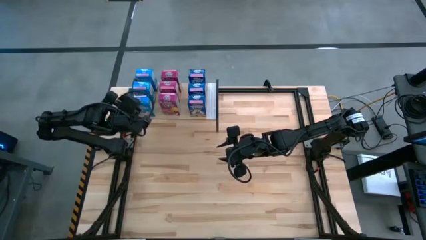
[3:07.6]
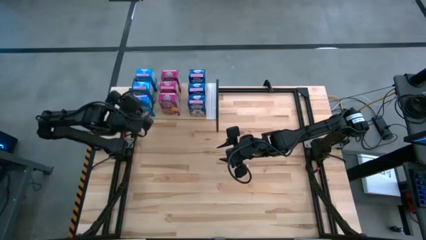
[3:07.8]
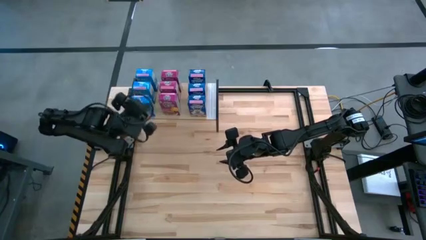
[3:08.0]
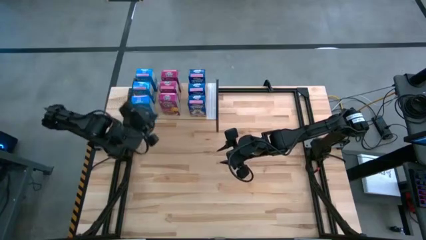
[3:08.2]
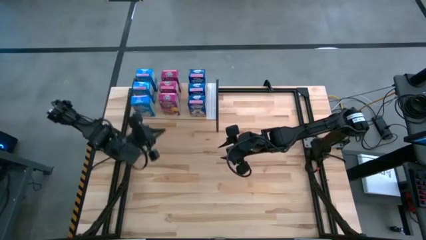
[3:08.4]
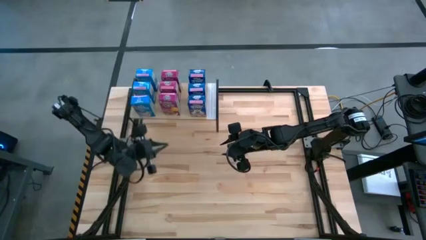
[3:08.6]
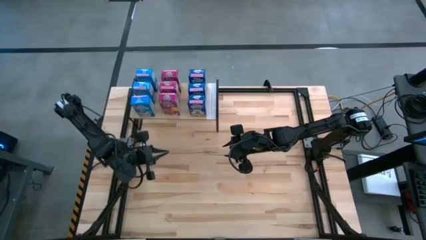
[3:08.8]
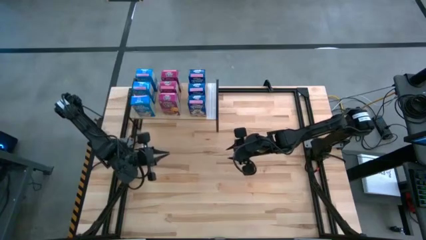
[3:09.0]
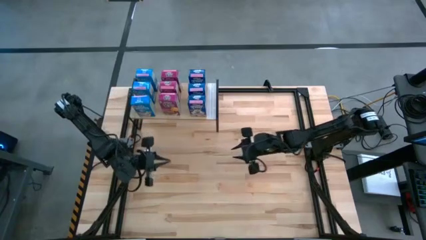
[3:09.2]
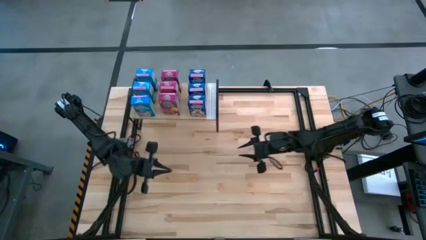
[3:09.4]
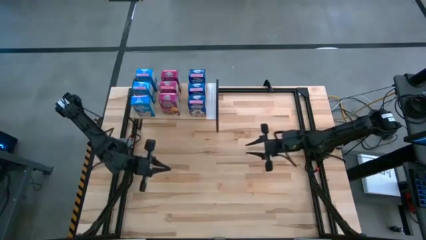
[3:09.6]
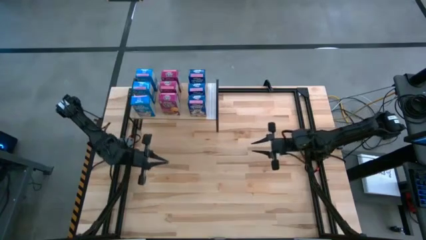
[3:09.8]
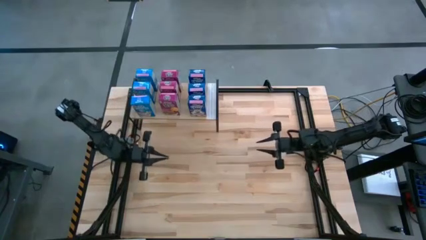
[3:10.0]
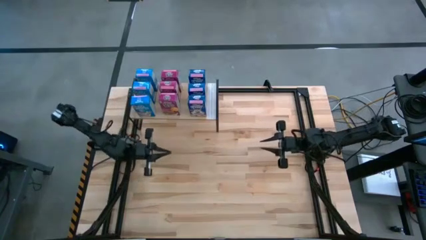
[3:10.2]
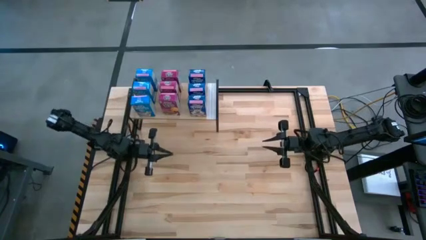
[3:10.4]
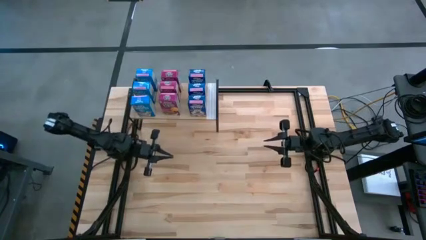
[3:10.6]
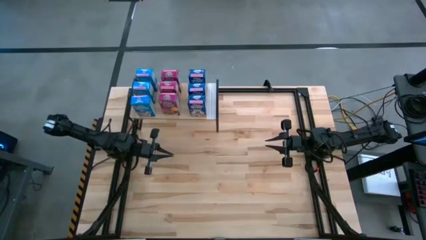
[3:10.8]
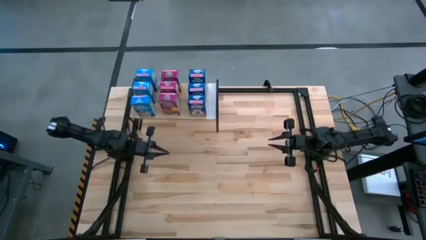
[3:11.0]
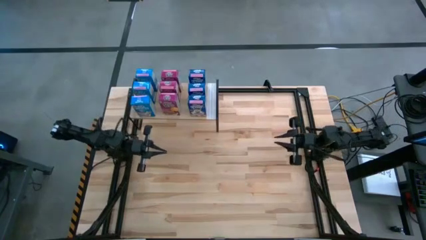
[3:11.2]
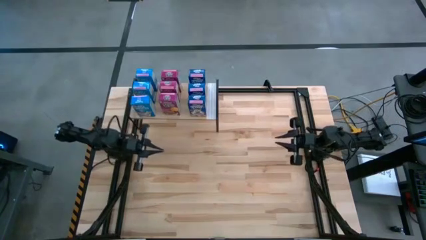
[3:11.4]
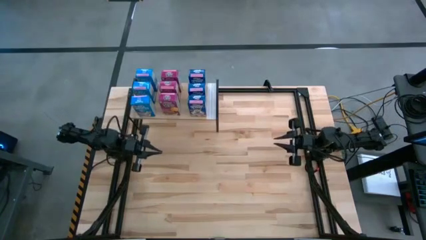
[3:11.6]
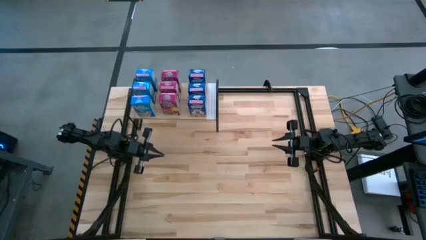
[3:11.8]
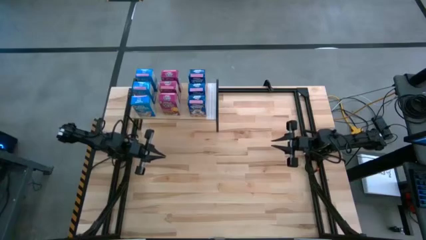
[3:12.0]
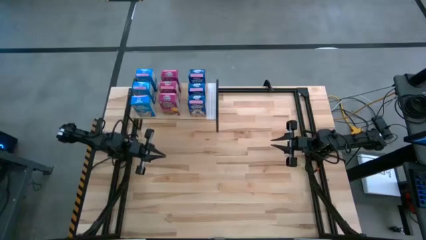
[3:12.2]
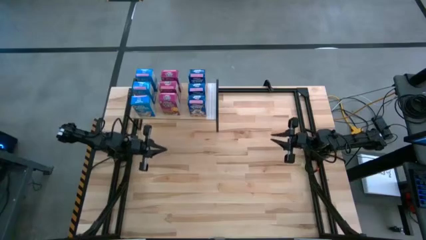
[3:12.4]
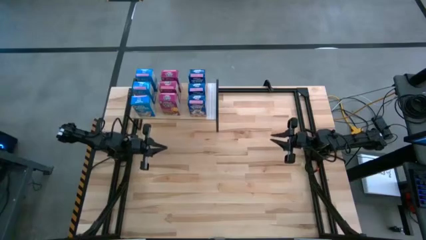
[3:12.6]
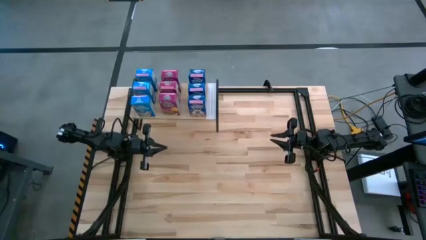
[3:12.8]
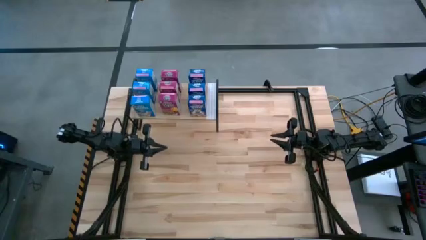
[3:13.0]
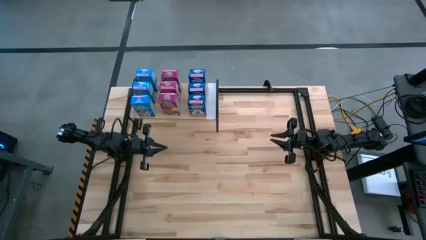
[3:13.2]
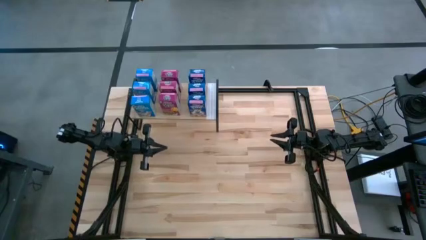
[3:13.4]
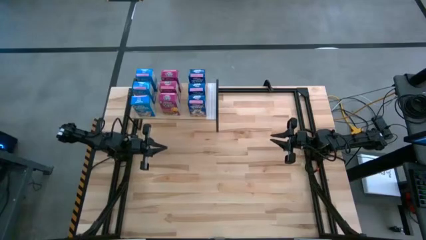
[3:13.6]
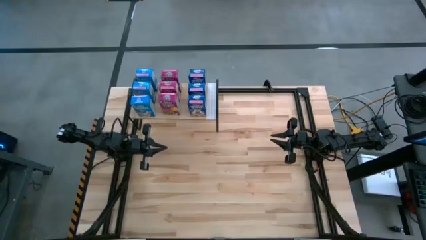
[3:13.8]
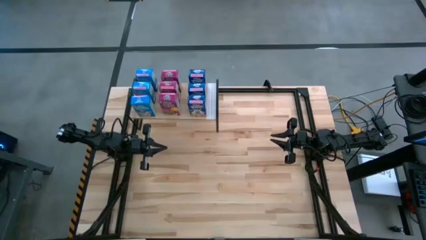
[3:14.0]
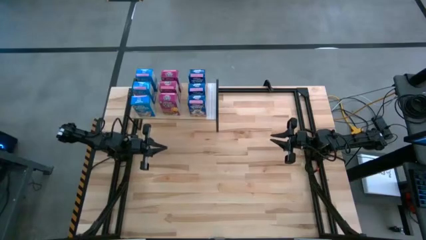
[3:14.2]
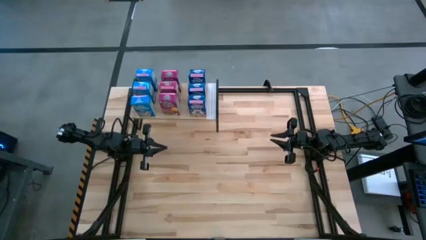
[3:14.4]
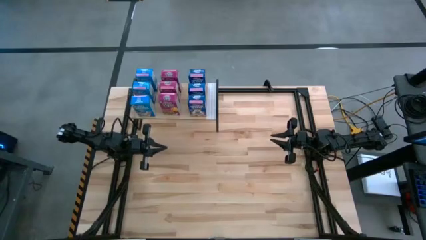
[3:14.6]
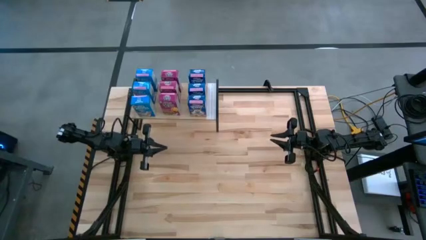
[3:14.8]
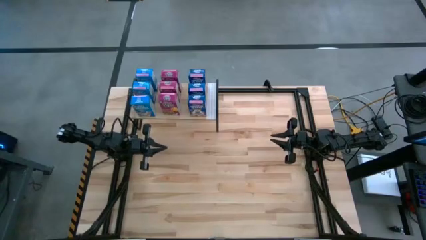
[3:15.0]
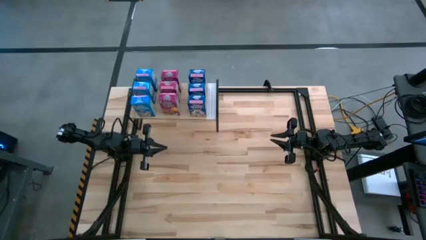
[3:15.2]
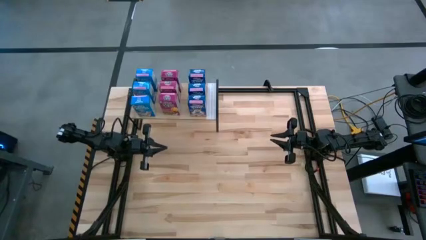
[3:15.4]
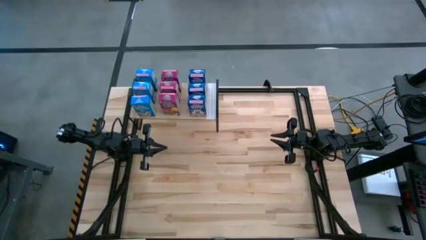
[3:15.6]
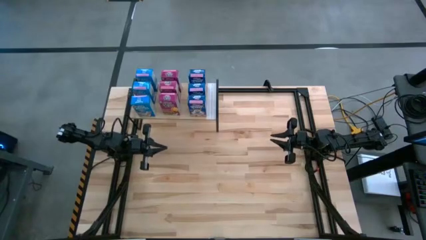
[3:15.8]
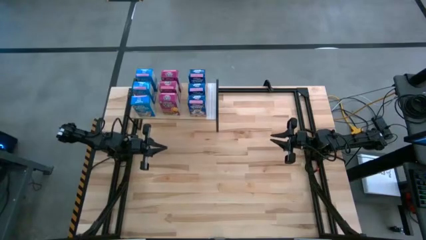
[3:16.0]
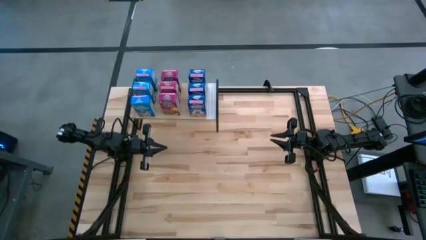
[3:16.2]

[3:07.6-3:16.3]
Task: Stack cereal on shelf
Return to Home Position

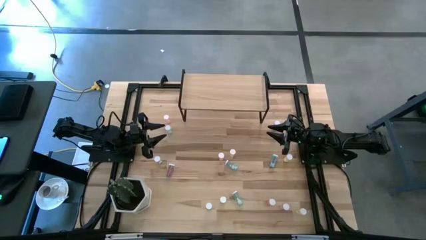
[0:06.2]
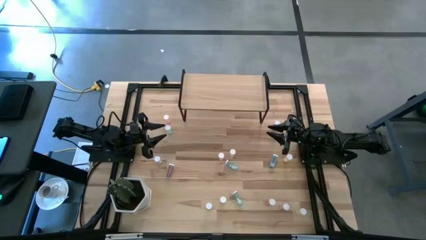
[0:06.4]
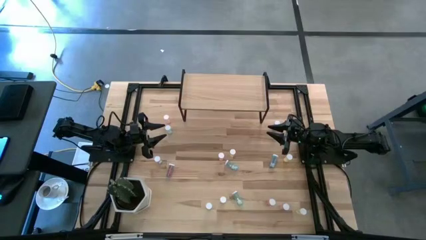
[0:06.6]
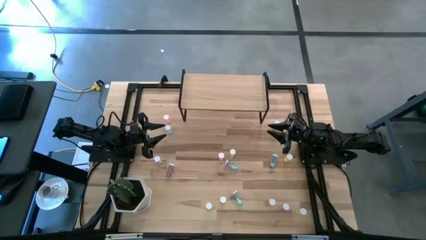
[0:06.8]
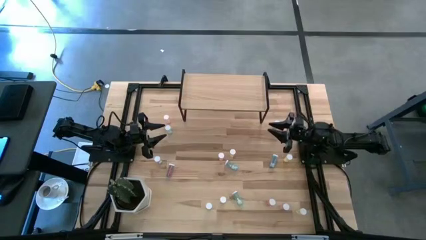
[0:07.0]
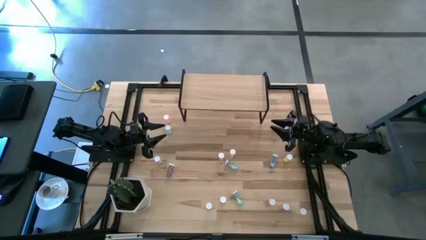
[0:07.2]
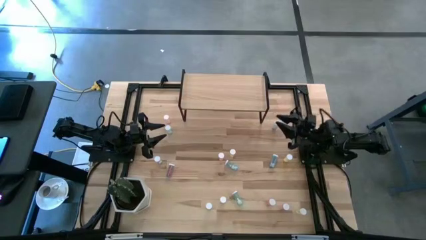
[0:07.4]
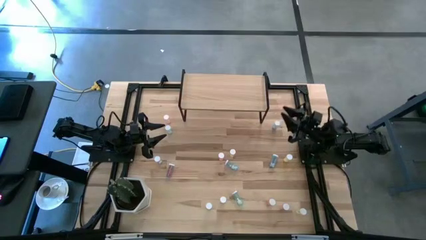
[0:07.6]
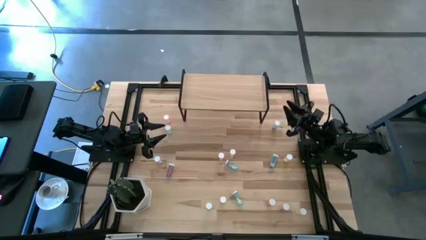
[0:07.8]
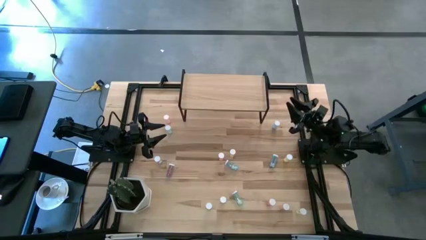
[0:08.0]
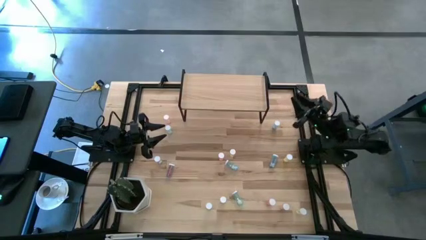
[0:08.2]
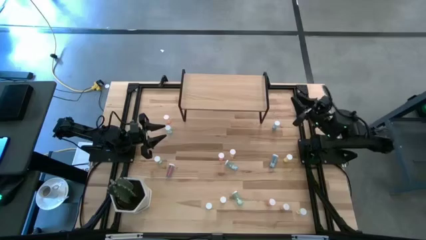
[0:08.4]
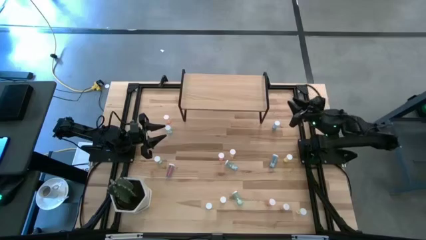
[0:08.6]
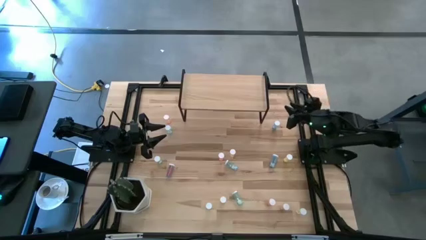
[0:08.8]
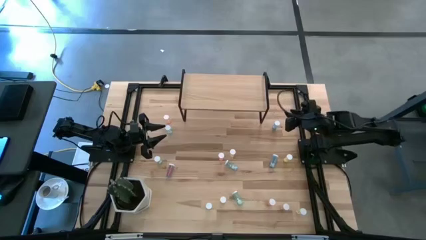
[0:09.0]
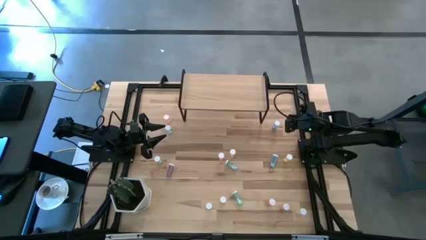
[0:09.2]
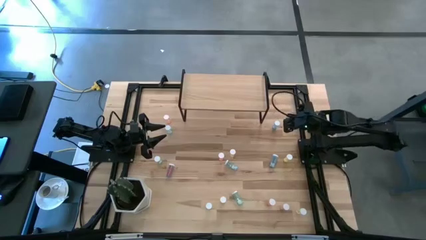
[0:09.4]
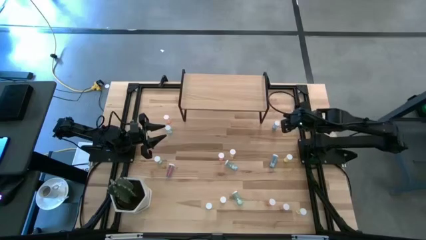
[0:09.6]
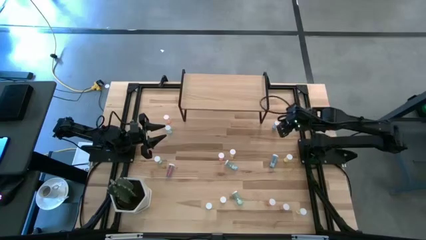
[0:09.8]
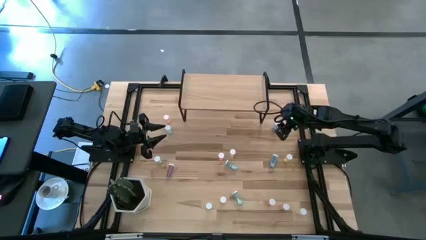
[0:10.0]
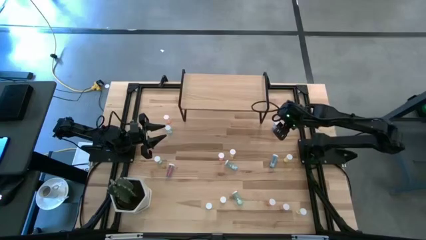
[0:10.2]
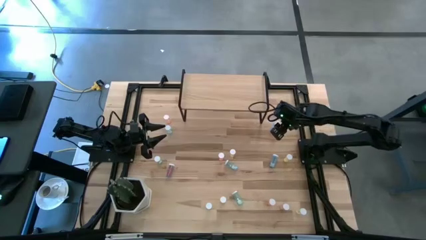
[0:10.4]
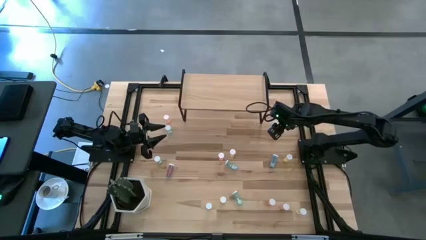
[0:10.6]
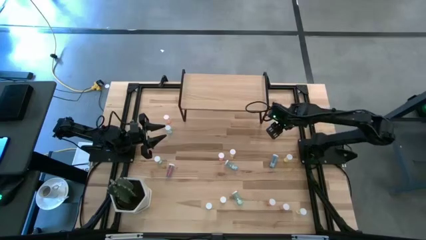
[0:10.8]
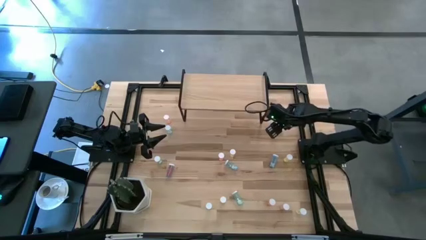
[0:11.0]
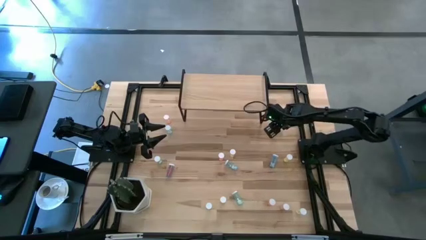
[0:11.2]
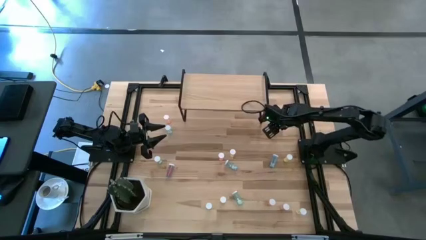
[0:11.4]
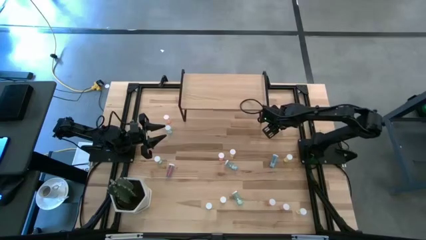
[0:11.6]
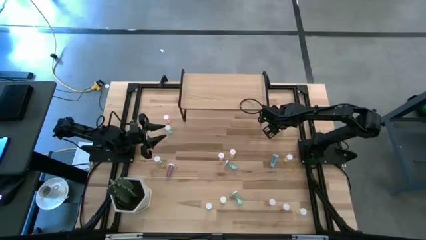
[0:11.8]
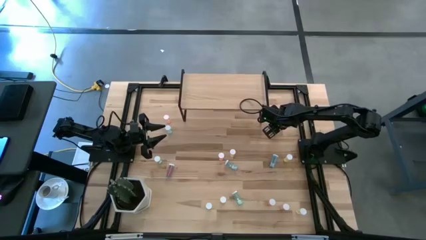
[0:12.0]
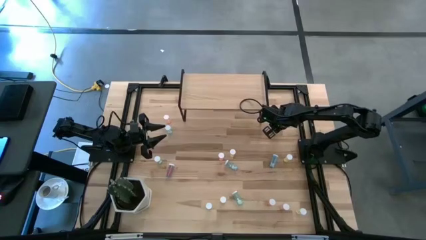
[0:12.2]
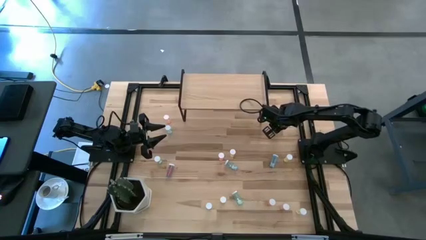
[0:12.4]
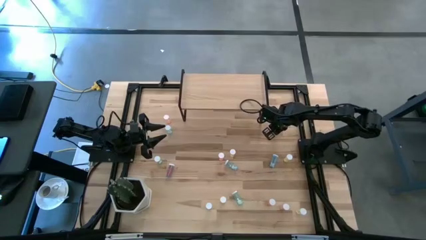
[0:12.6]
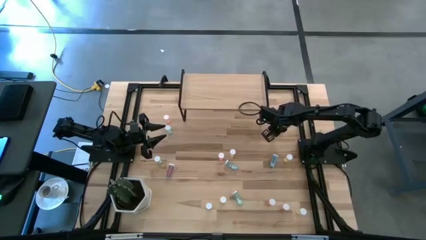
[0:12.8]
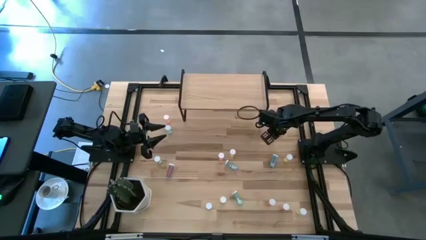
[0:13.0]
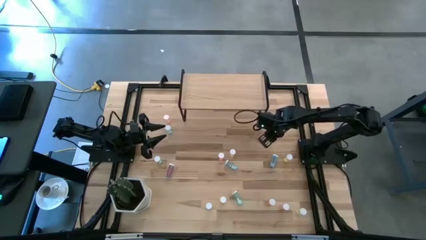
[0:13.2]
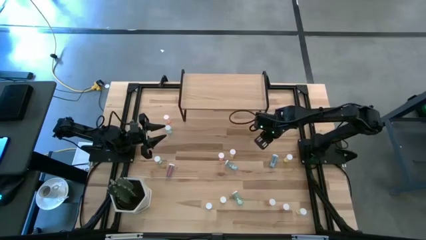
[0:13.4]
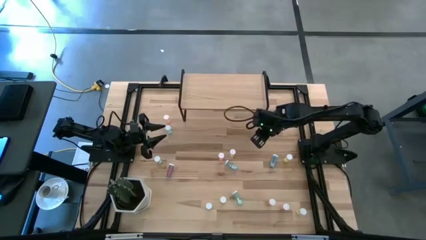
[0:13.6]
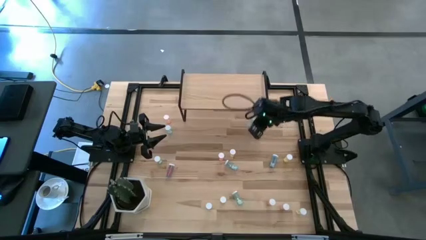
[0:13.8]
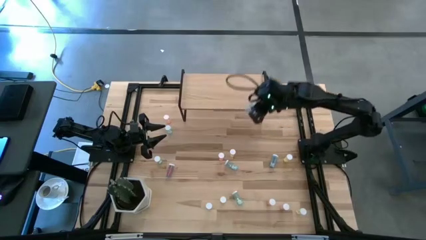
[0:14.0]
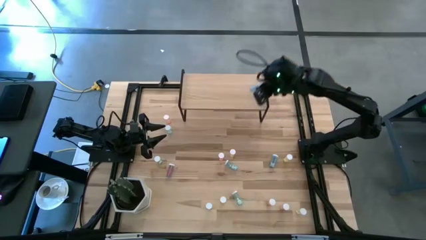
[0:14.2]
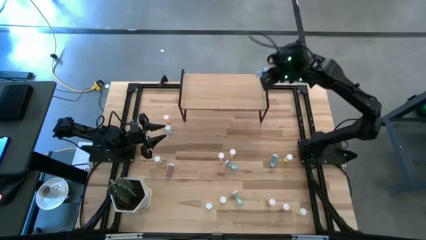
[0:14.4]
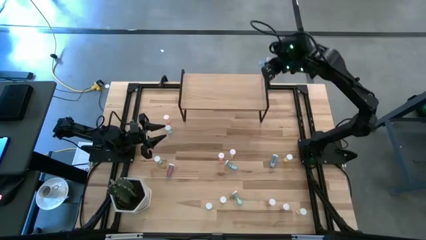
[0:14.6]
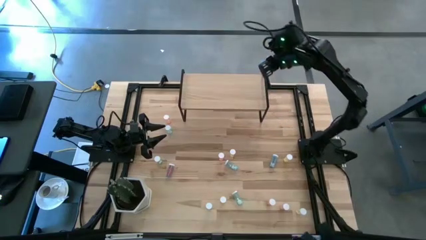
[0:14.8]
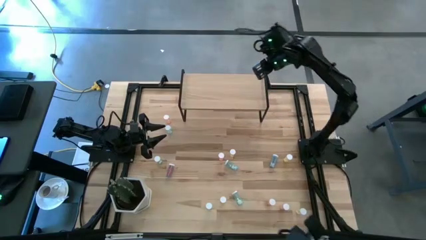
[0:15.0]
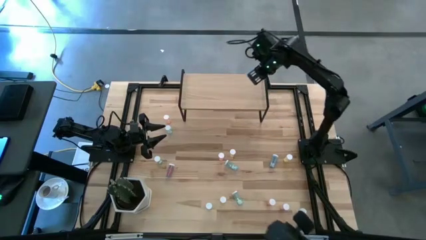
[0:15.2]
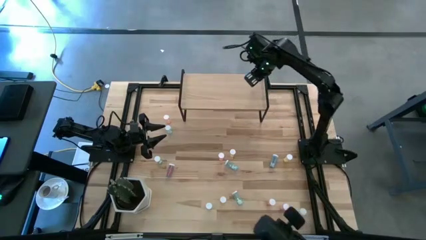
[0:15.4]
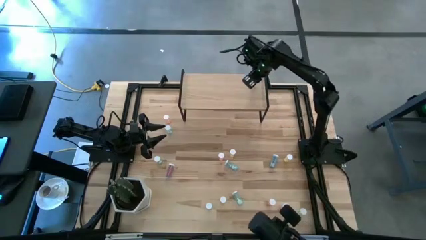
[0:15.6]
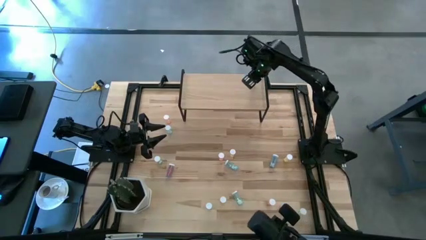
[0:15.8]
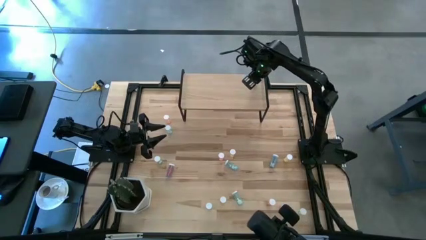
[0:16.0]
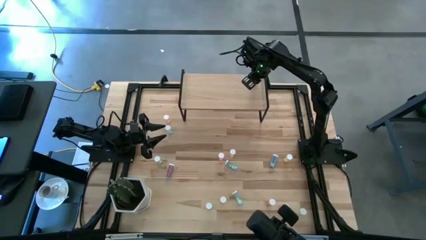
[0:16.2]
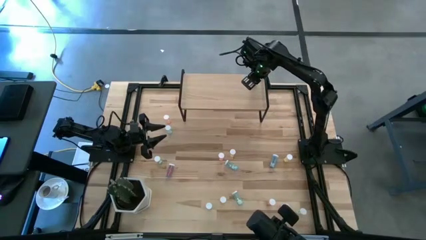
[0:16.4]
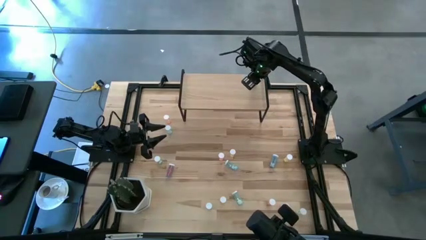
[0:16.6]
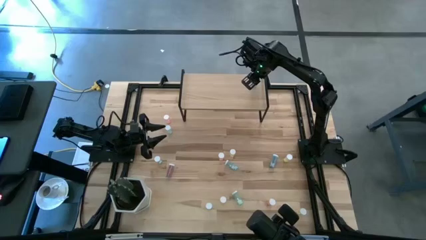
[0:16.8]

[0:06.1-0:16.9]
Task: Pick and place medicine bottles onto shelf by color
Put the blue pill bottle on the shelf
